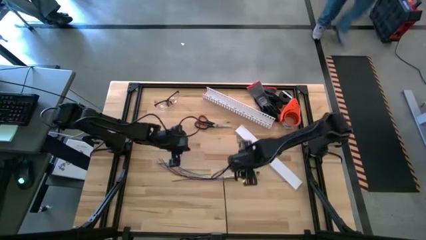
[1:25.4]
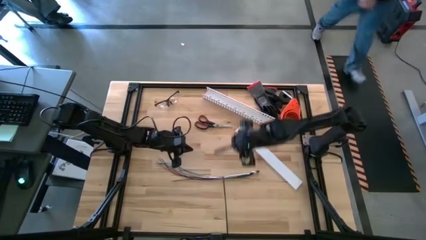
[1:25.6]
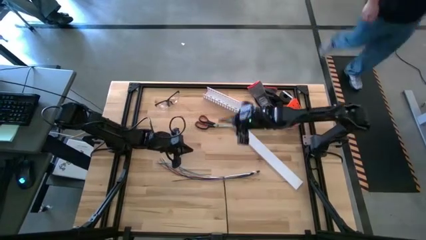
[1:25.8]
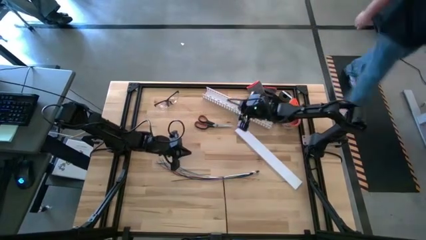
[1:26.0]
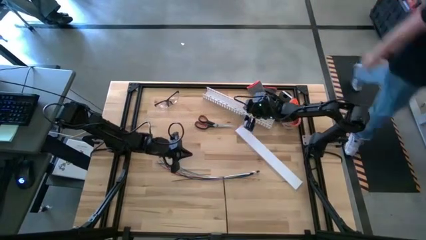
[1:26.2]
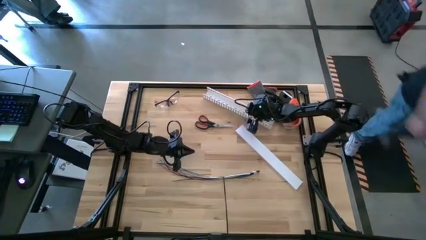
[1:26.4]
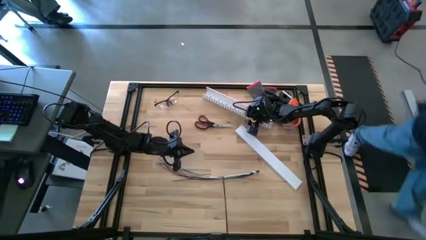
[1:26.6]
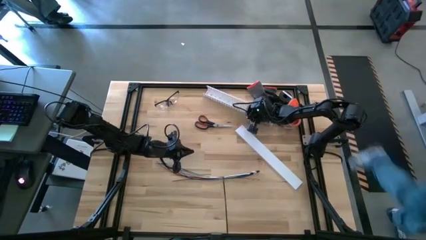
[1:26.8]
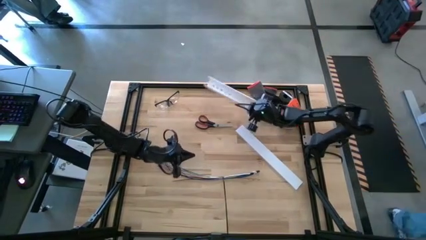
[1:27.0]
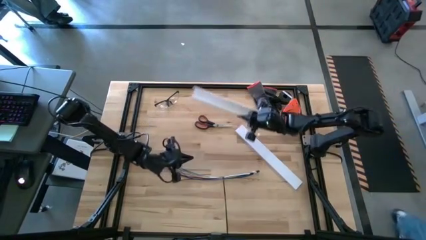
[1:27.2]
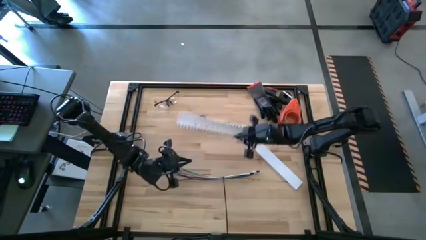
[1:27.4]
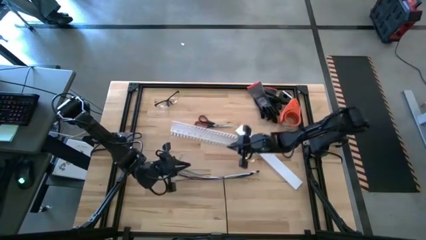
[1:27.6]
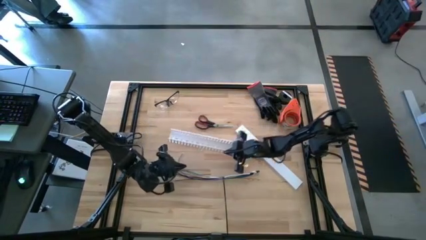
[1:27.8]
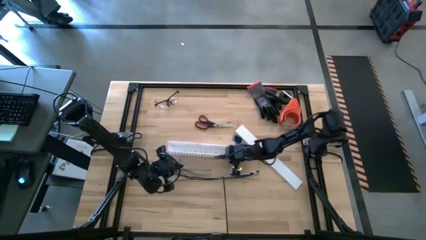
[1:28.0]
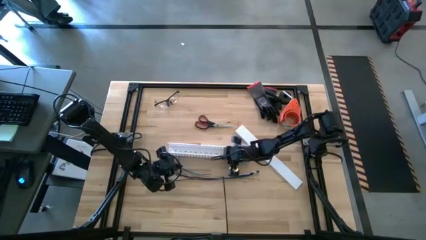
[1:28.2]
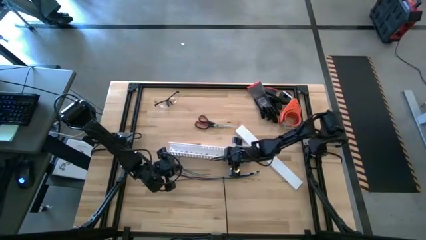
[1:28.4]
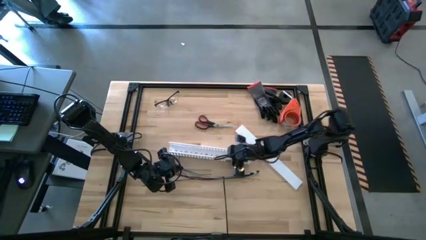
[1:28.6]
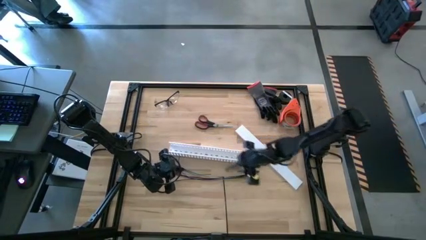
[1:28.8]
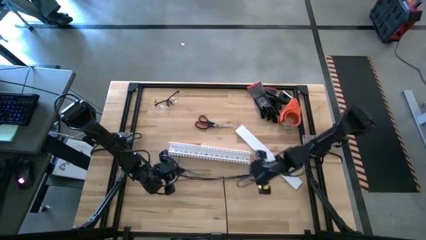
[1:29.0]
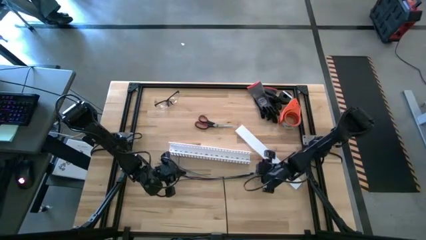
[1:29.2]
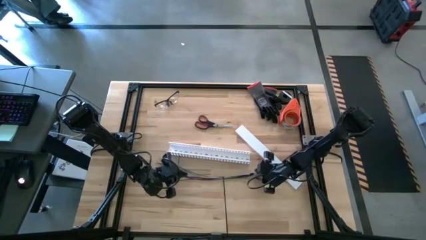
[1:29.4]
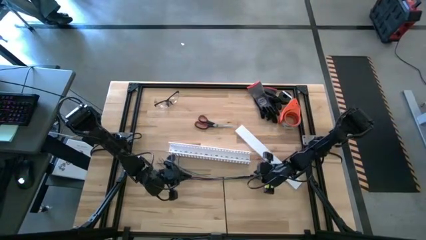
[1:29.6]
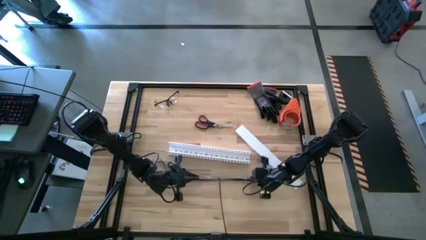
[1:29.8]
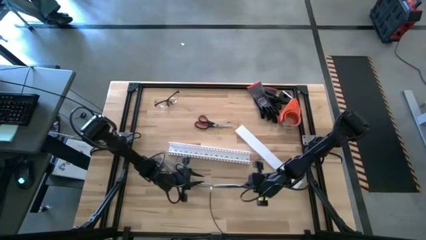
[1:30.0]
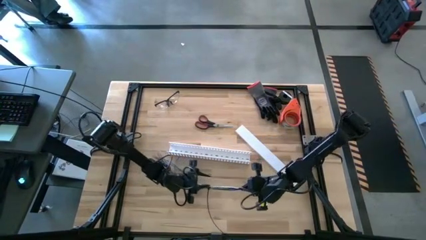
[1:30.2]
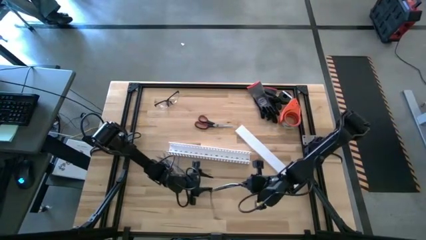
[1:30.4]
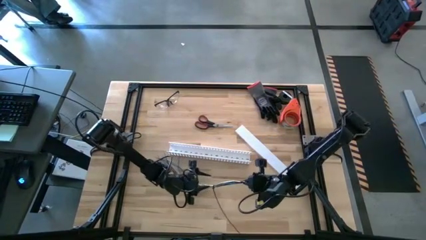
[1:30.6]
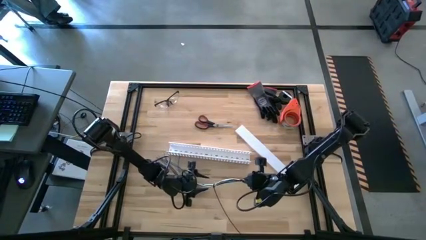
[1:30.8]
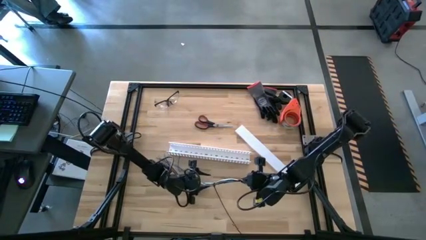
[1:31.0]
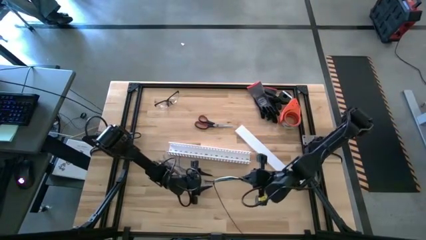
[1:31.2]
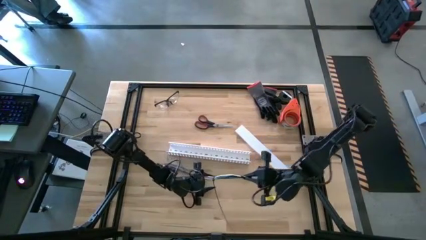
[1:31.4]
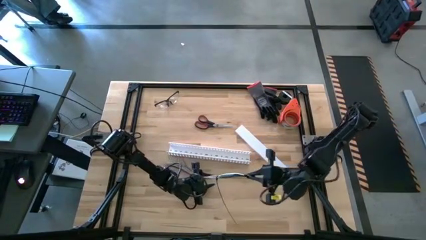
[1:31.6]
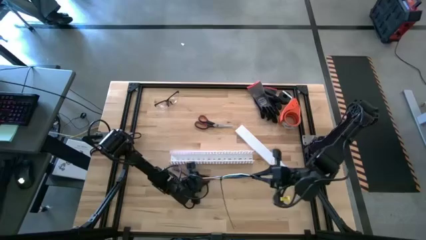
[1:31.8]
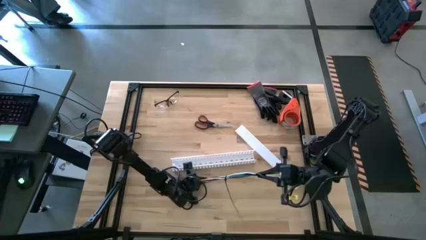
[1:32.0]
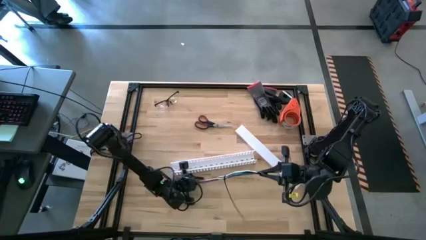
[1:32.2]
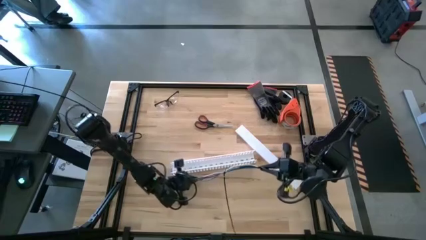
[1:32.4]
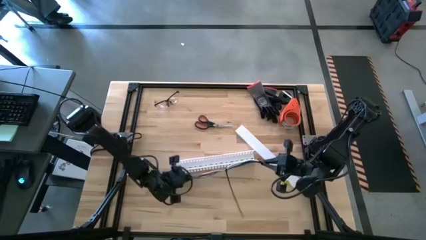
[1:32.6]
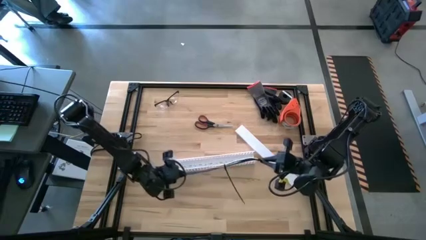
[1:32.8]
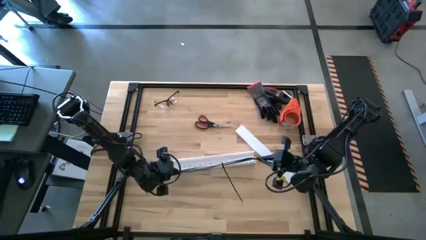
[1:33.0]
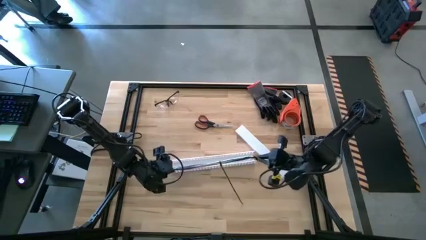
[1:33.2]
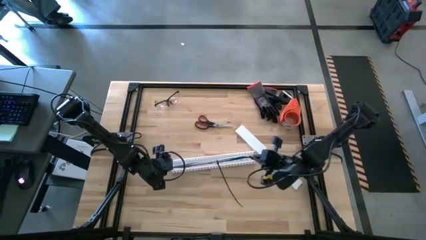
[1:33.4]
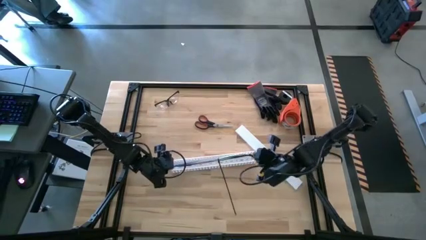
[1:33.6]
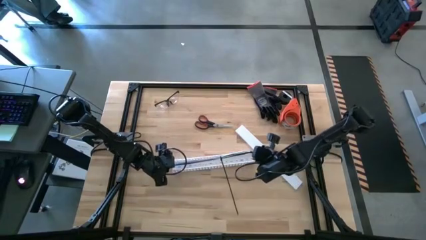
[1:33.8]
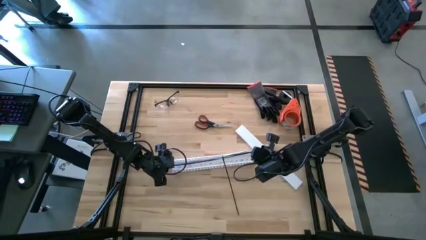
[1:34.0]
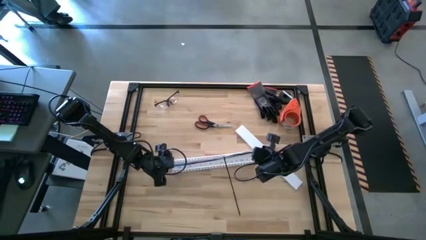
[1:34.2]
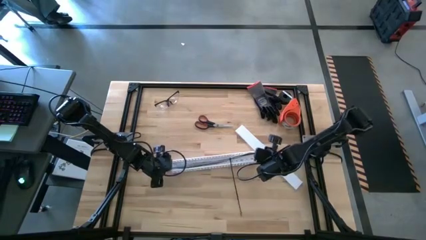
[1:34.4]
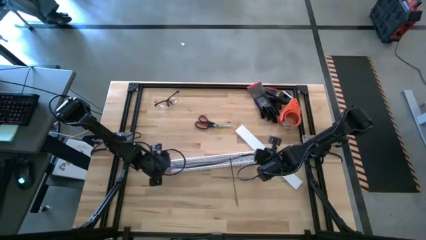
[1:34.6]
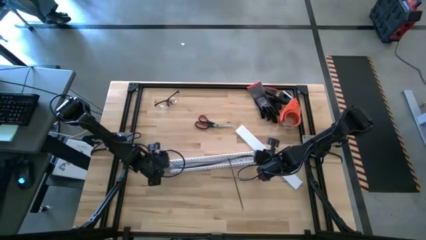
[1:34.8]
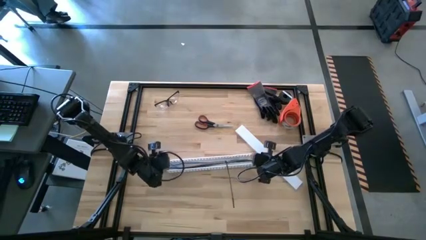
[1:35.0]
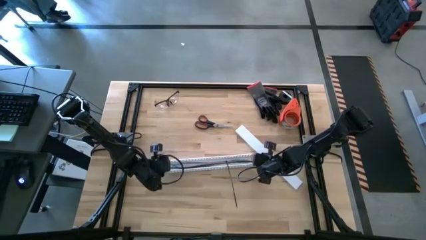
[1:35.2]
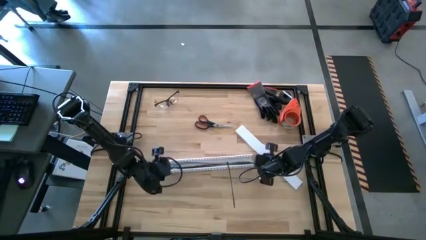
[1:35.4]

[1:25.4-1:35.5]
Task: Ziptie cables
Put the cable wires into the white cable duct

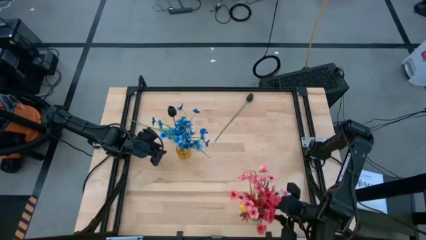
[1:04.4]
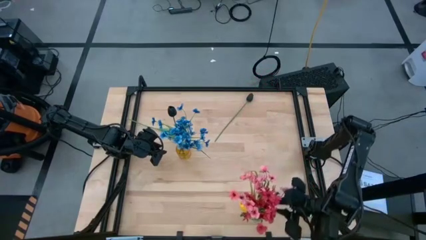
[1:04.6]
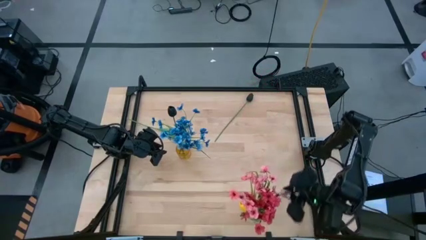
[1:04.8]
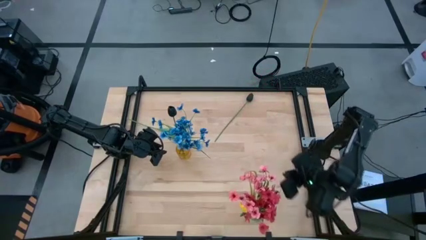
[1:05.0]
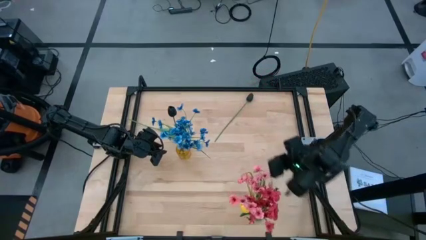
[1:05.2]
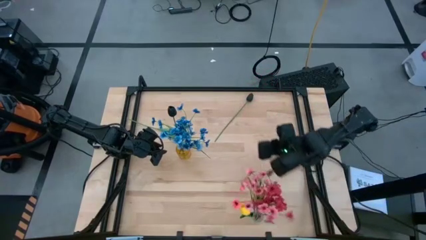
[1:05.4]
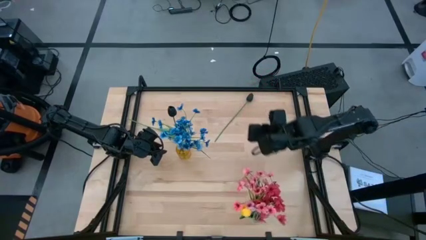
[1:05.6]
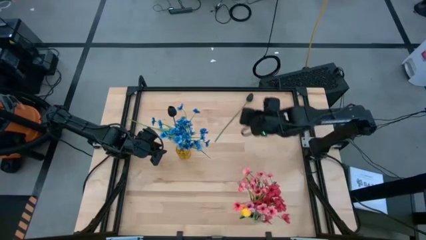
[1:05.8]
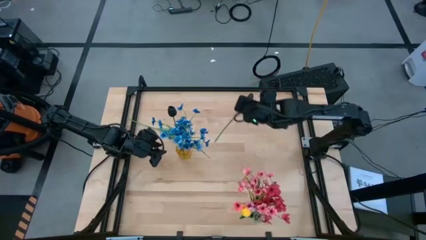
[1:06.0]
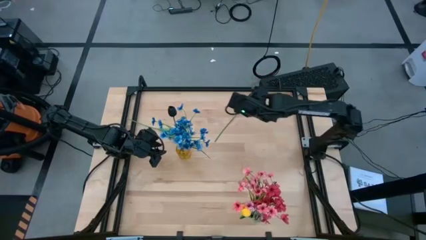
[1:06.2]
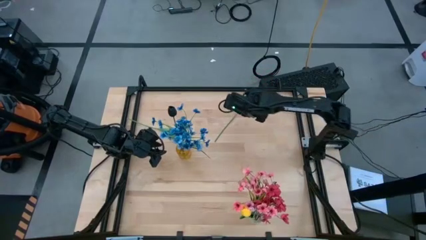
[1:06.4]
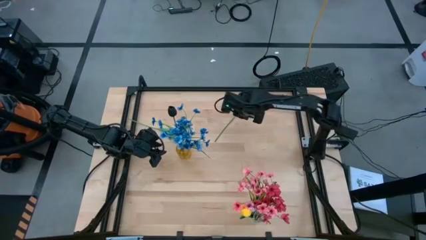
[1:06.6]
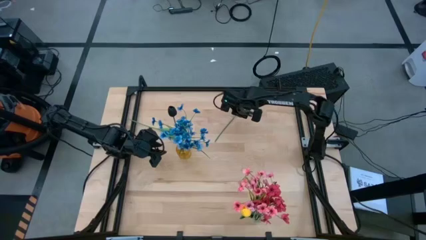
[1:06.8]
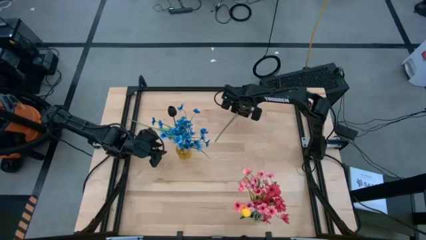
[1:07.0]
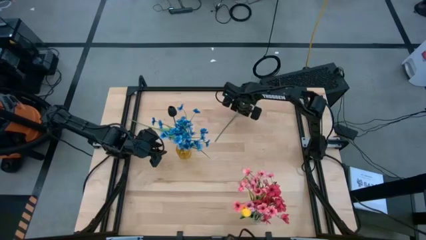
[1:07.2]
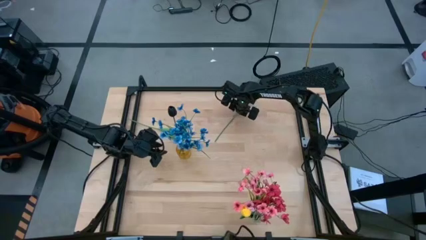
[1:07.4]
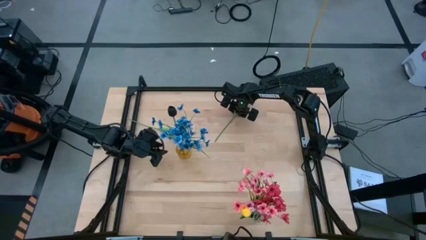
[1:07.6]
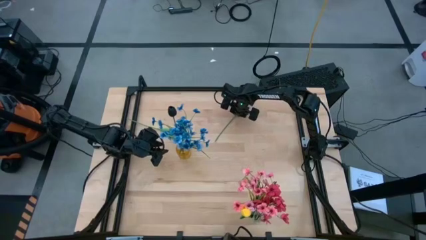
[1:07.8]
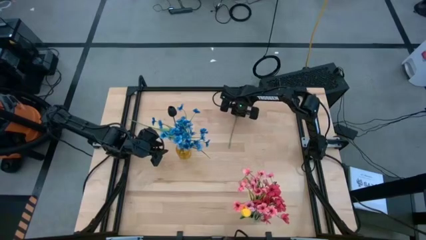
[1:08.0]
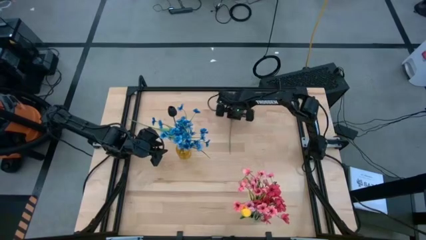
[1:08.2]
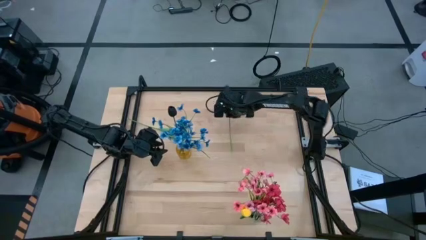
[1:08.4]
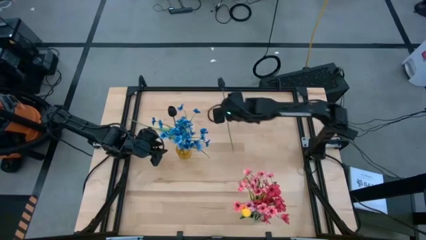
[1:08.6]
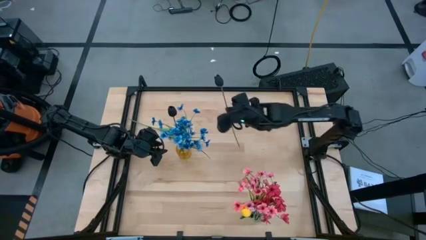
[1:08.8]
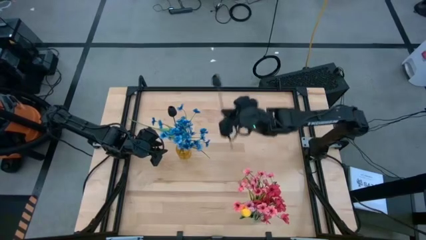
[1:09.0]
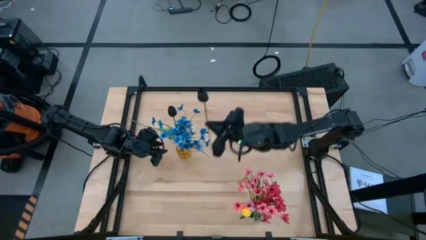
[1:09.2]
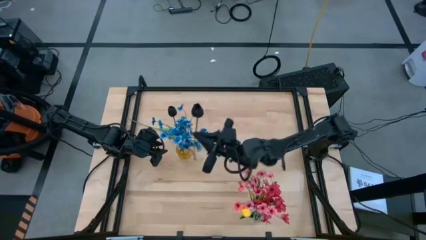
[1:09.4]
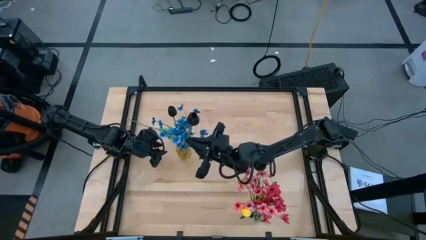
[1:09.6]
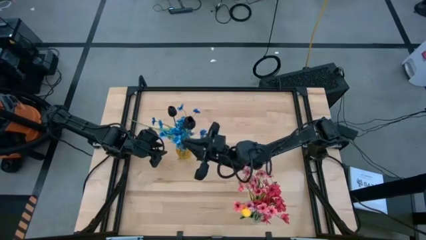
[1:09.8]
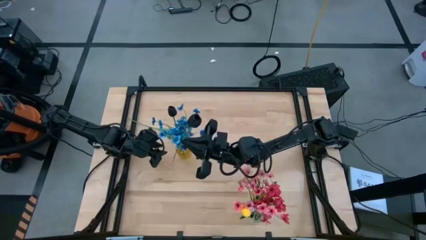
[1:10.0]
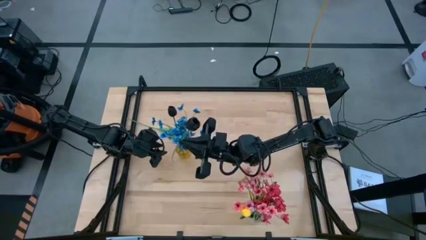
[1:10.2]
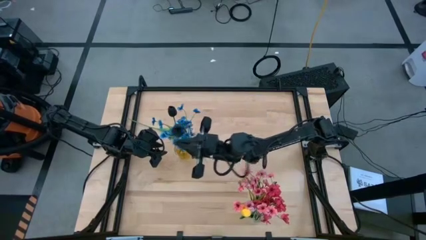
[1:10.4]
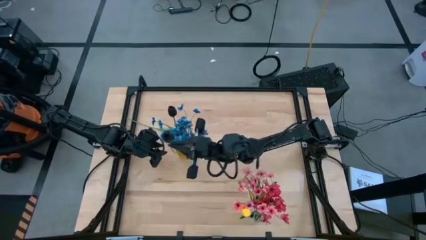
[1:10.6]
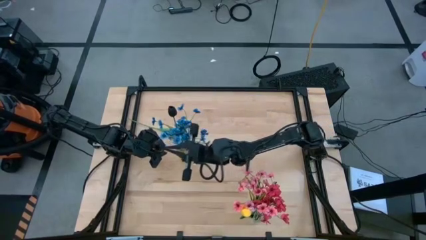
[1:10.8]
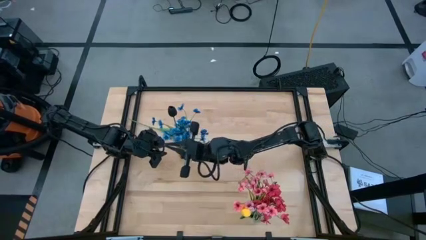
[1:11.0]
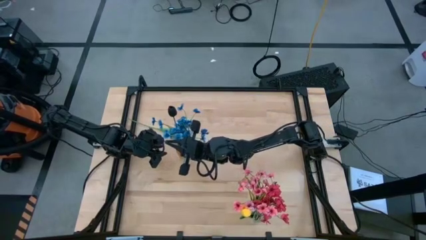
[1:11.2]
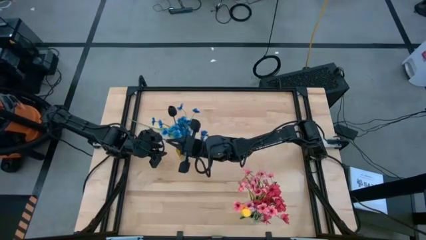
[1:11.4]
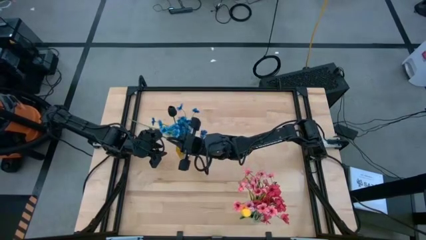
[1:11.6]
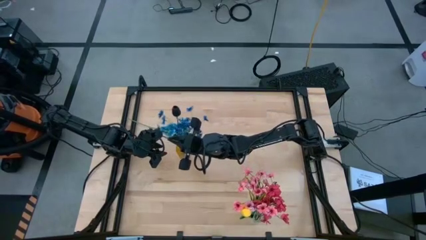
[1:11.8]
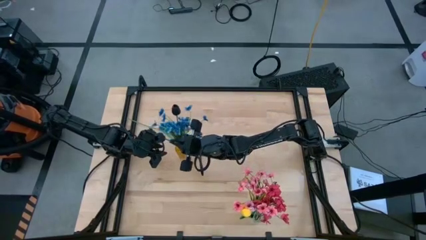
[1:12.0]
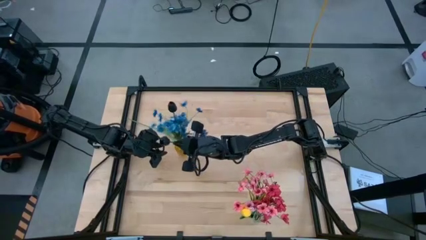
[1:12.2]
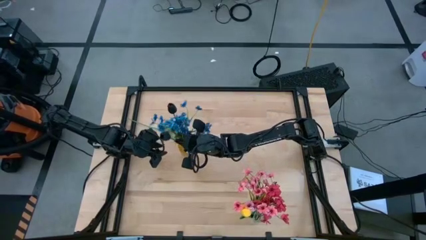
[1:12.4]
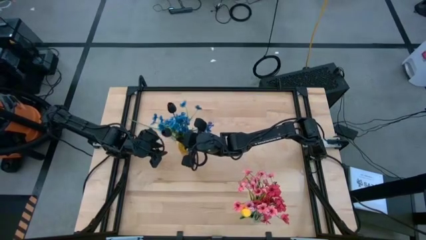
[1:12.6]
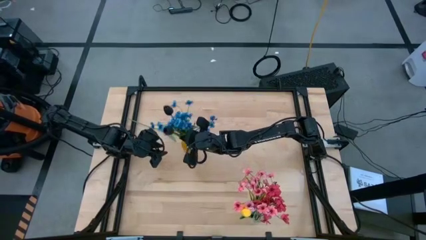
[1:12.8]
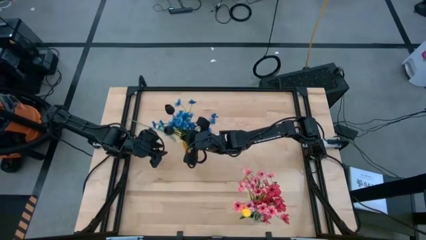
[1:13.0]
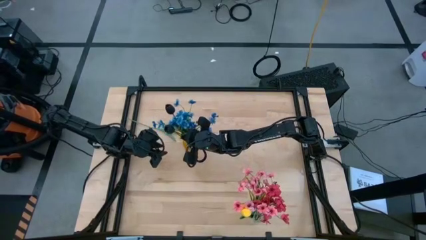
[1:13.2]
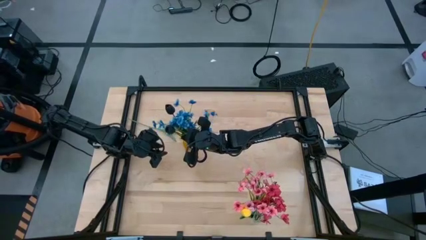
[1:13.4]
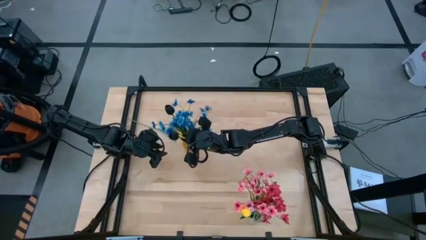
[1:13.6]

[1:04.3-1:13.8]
Task: Sort flowers into vase by color
Put the black flower into the yellow vase
